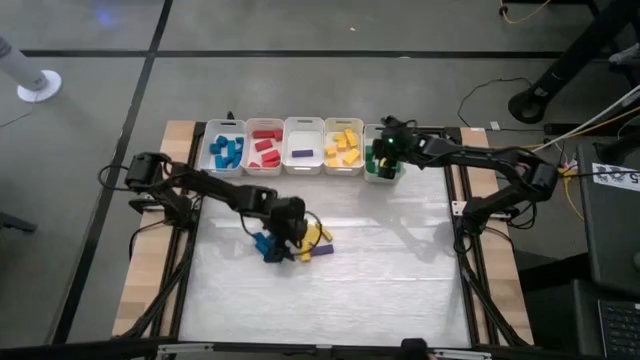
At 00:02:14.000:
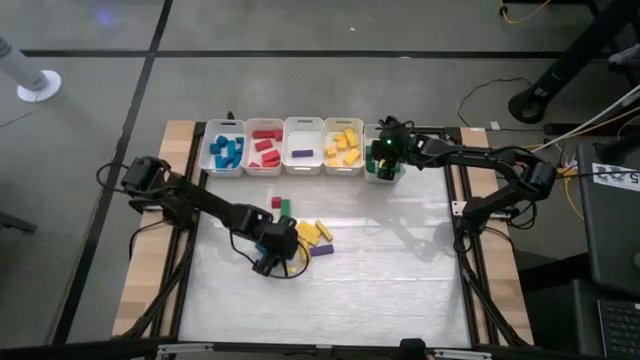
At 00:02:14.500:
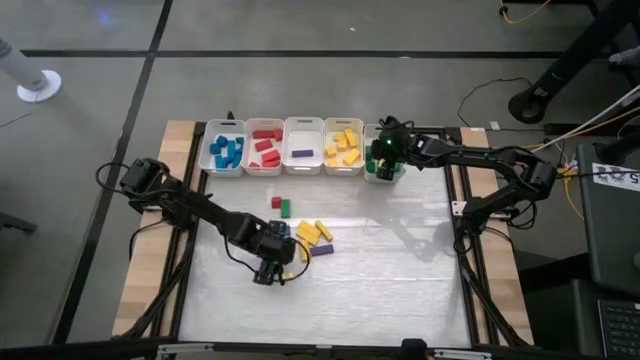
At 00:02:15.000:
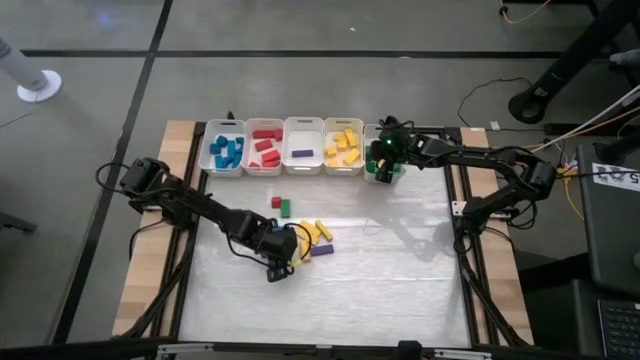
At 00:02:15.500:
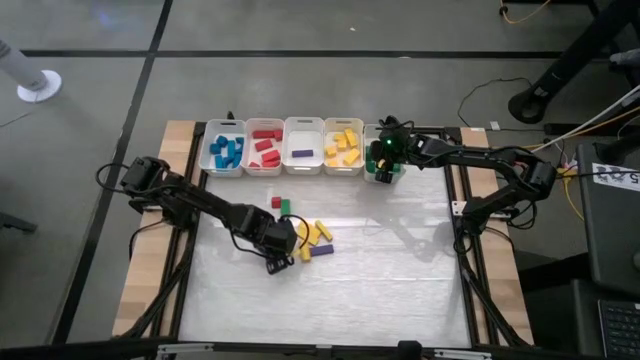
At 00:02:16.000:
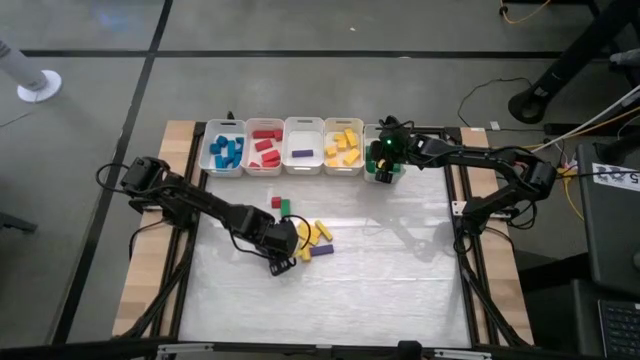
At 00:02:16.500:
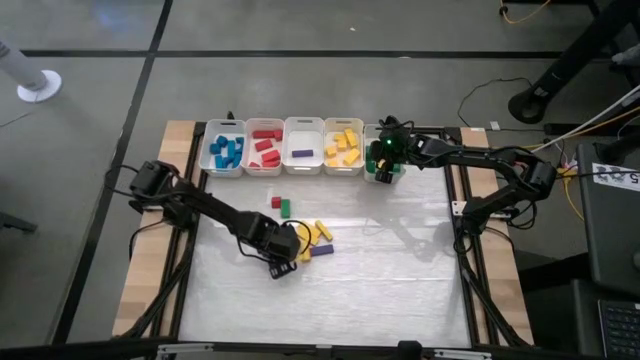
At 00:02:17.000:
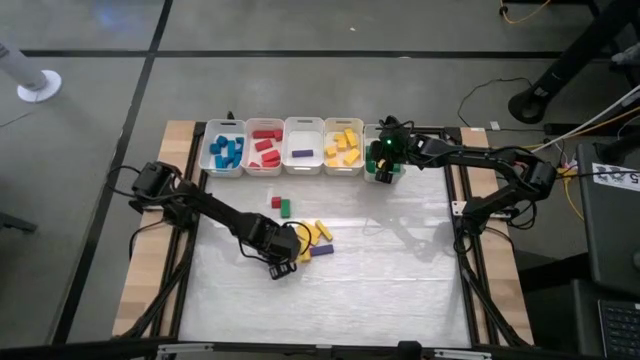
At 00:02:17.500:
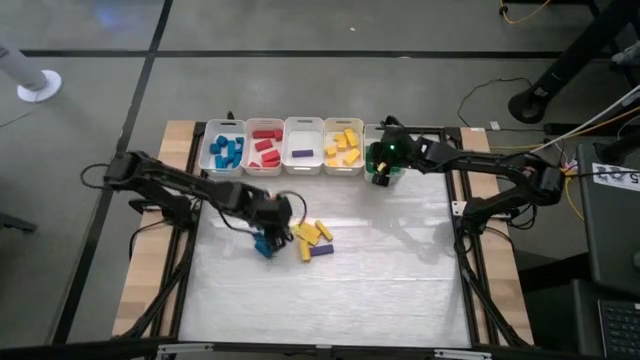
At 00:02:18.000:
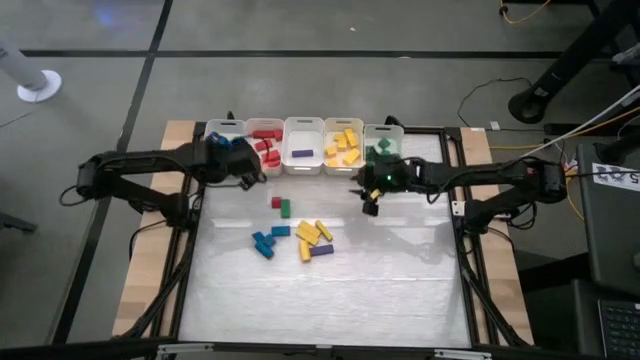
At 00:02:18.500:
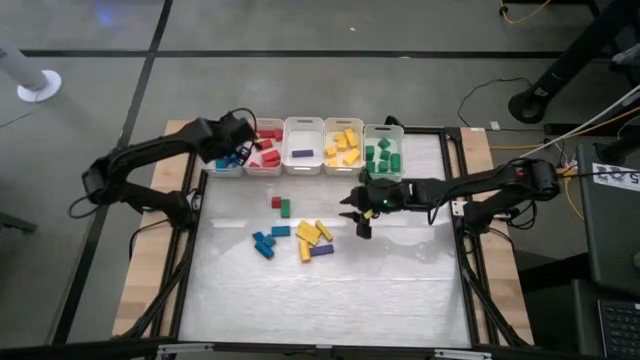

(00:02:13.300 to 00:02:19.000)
Task: Sort blocks
Put the blue block into the left white bin

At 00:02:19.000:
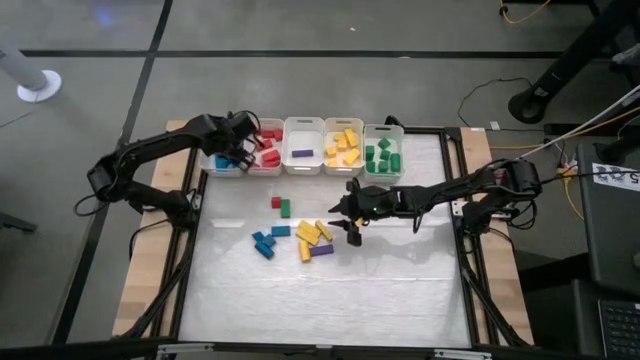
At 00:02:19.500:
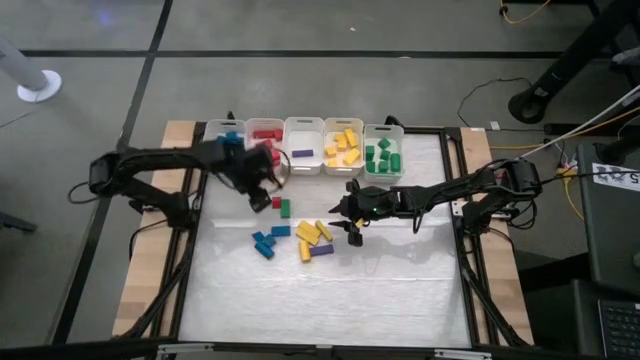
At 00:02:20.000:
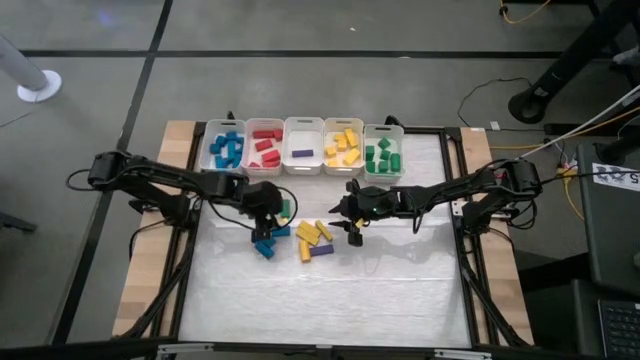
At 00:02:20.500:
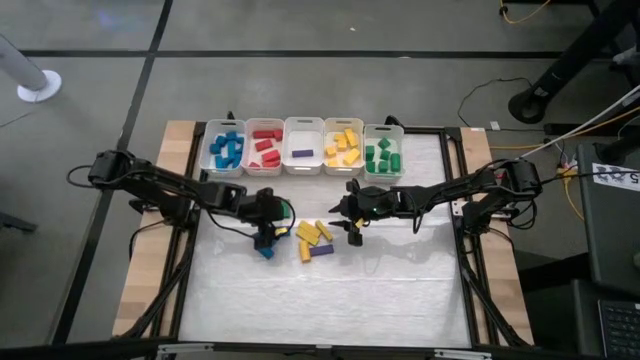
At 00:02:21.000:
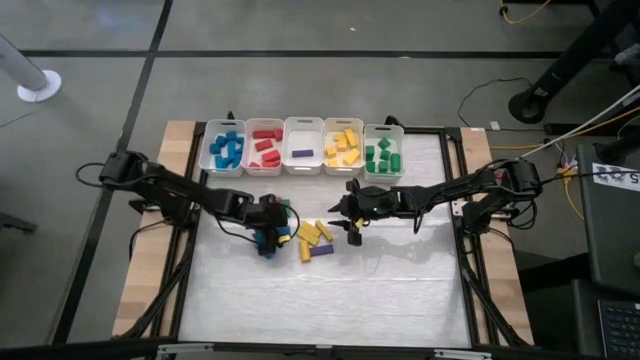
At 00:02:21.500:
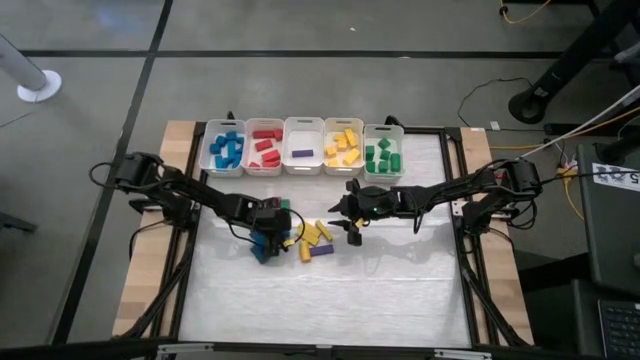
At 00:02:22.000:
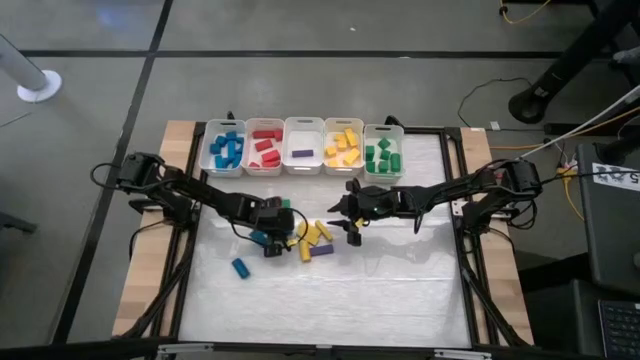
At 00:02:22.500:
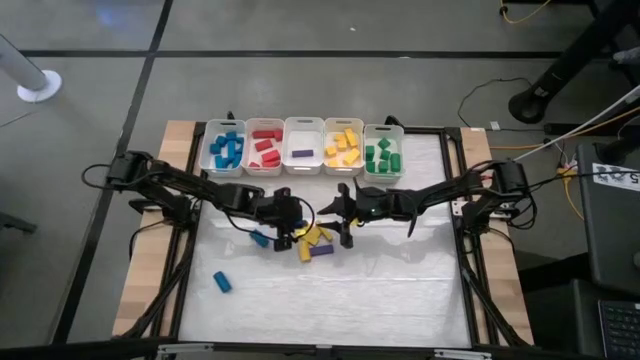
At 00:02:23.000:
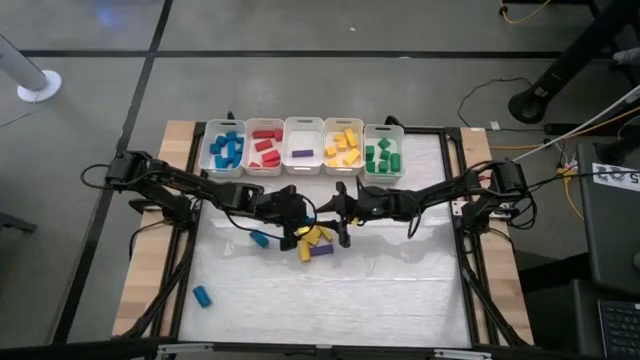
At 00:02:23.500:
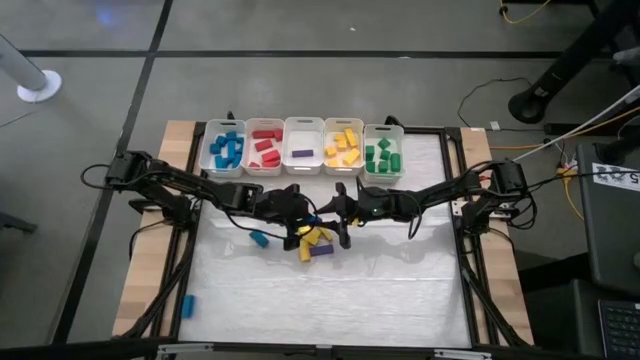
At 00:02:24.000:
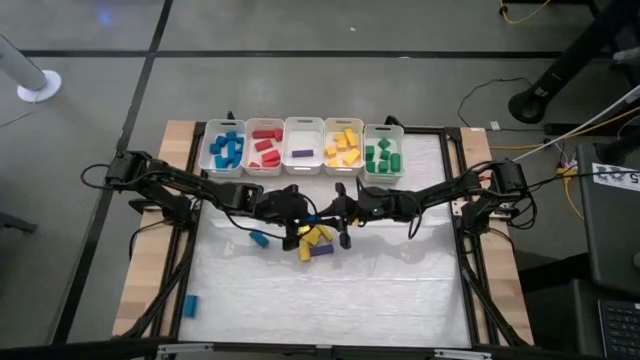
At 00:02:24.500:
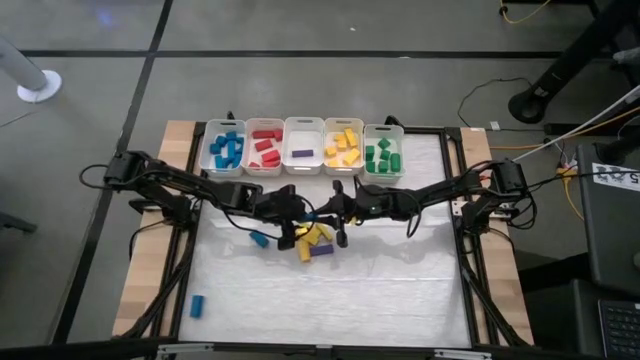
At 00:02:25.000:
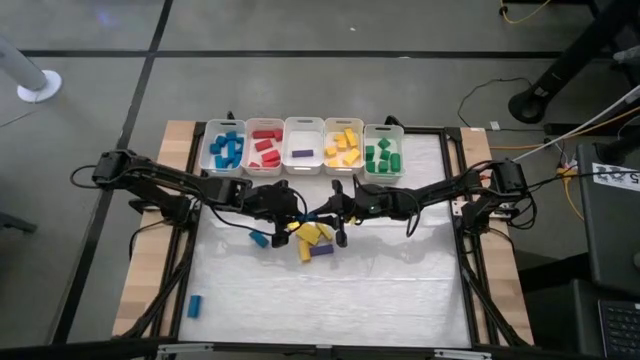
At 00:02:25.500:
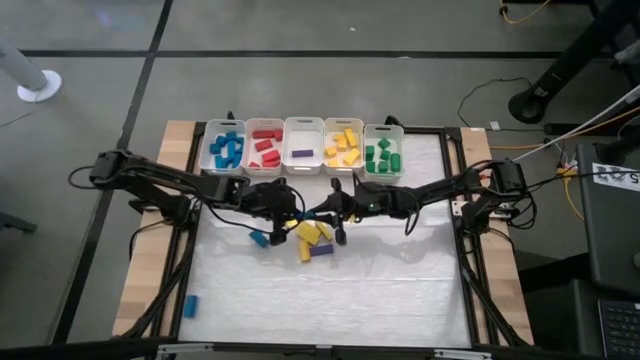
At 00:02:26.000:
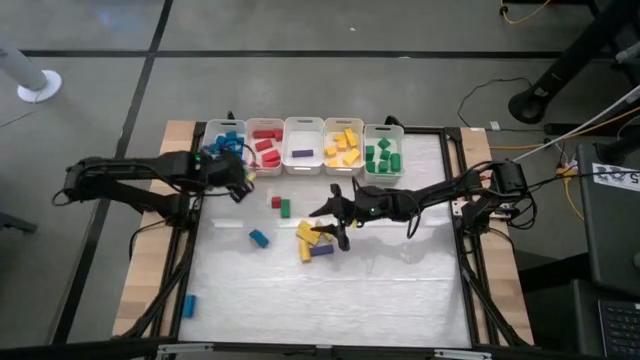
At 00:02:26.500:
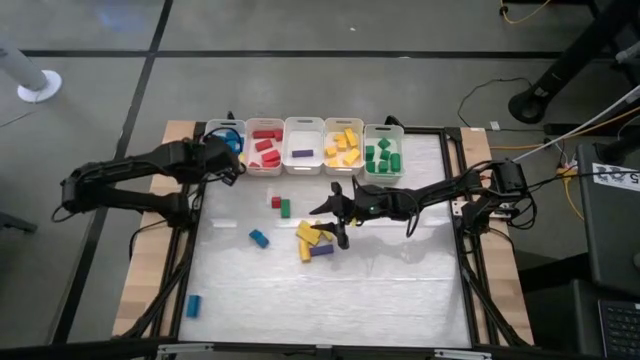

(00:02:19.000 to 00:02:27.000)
Put the blue block into the left white bin

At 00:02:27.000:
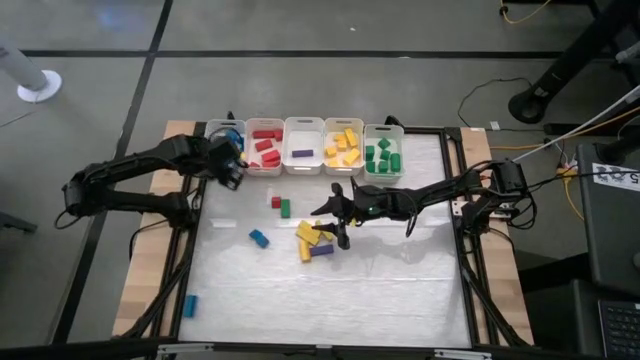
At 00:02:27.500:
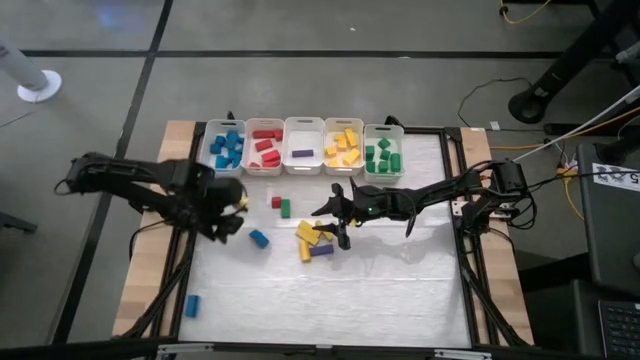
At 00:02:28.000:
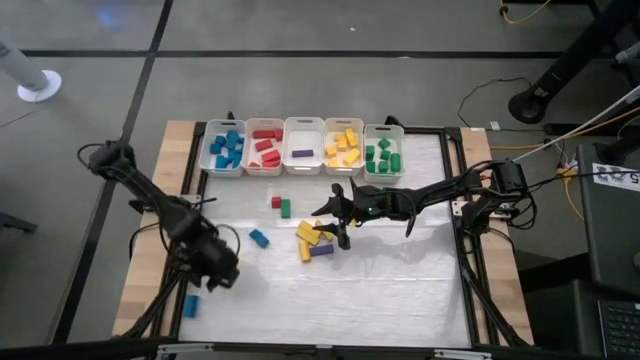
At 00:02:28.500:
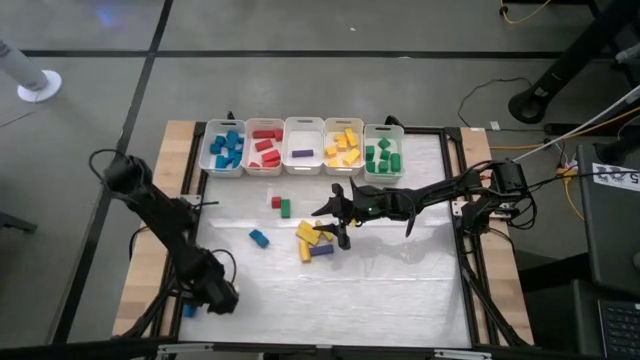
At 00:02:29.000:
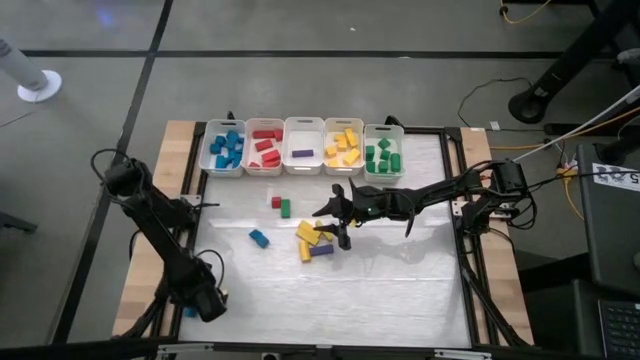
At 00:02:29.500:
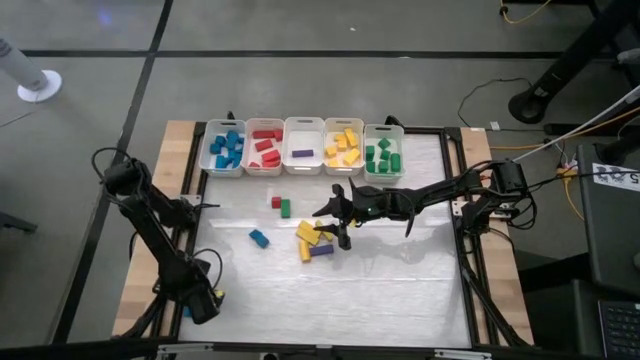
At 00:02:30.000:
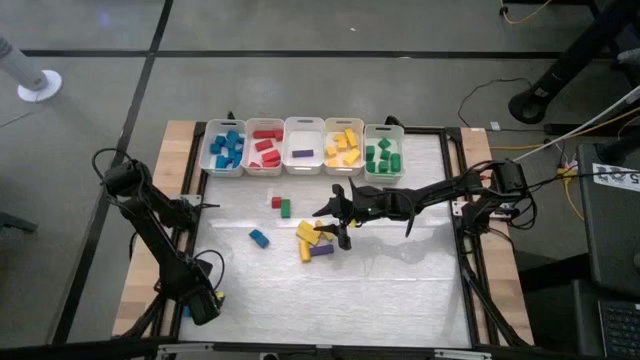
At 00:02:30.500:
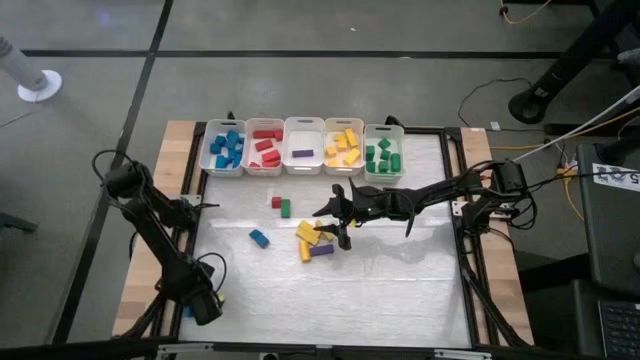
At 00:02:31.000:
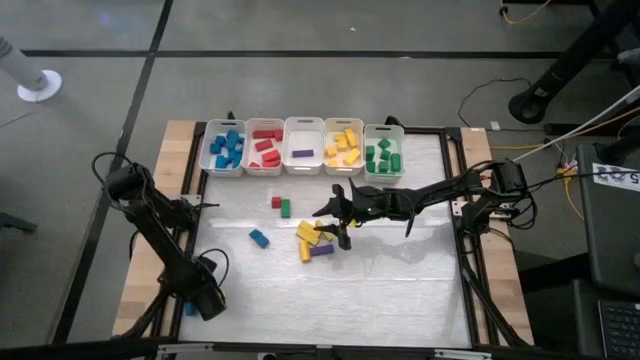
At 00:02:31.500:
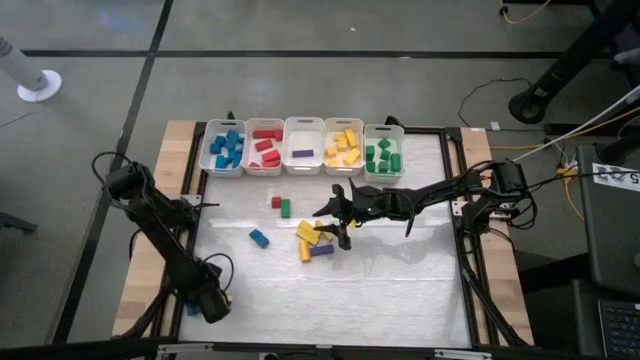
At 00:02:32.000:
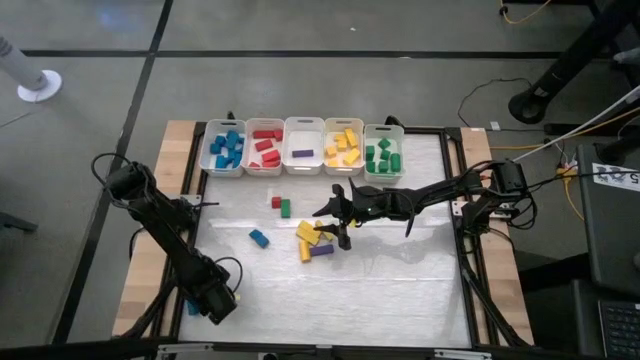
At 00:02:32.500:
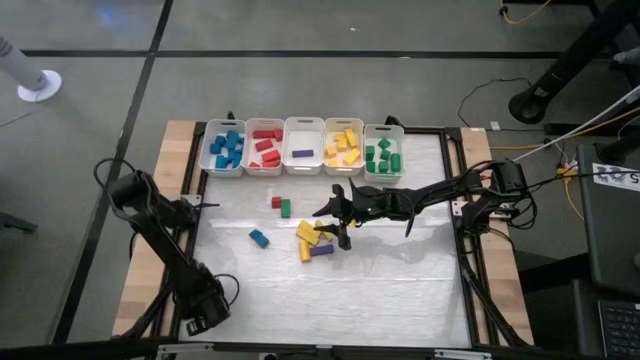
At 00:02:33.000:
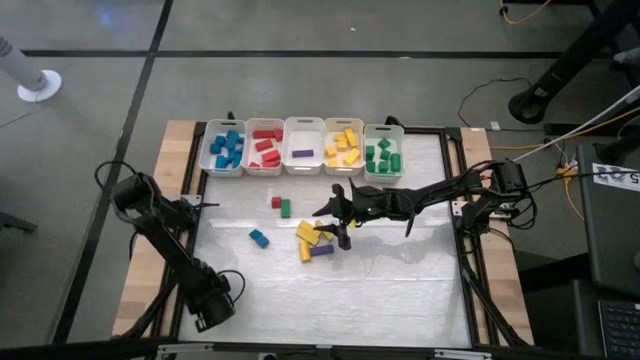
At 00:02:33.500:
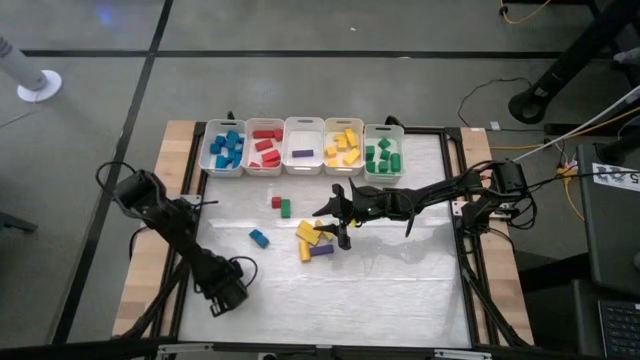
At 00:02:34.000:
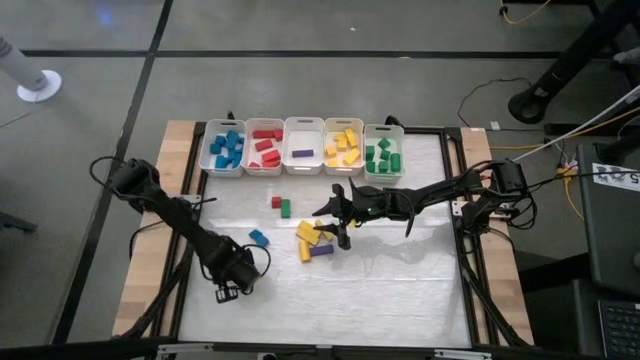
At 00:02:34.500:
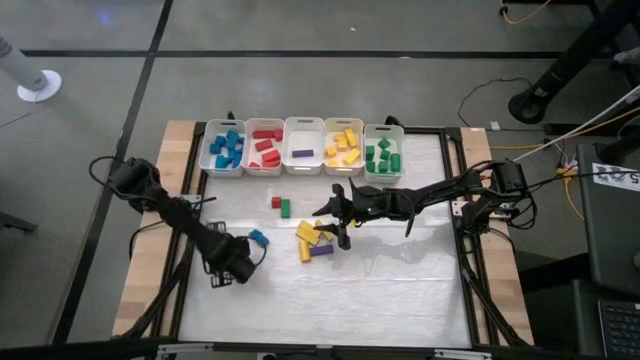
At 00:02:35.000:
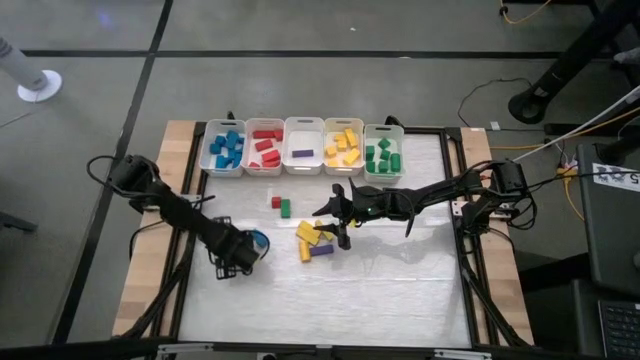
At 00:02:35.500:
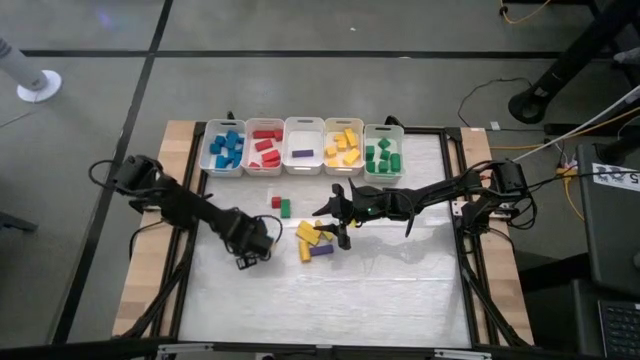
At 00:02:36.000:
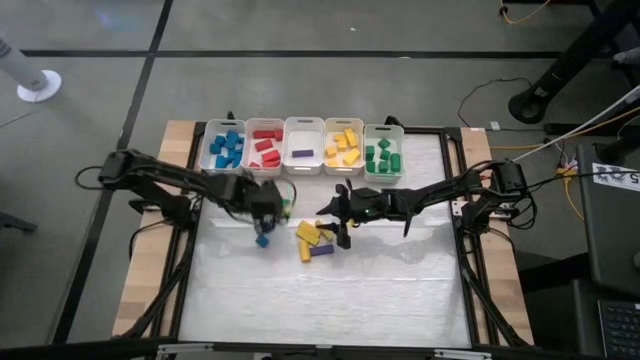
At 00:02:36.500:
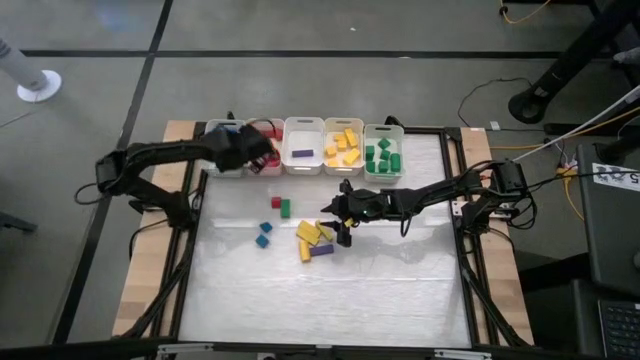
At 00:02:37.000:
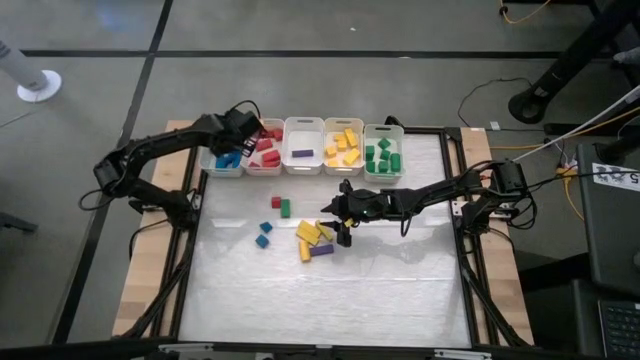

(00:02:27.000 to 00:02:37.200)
Put the blue block into the left white bin
